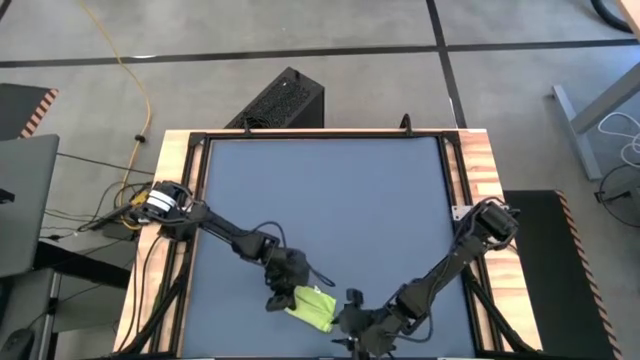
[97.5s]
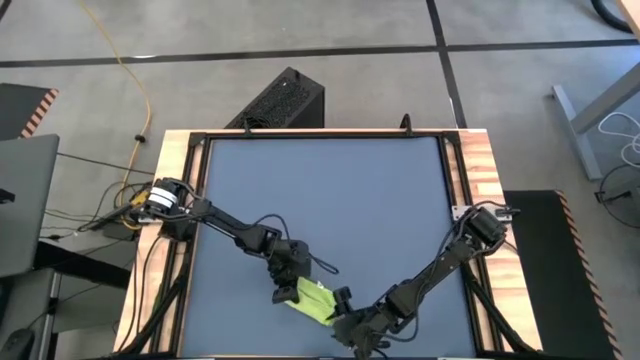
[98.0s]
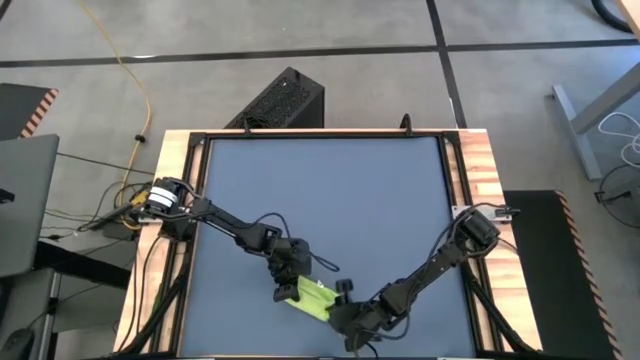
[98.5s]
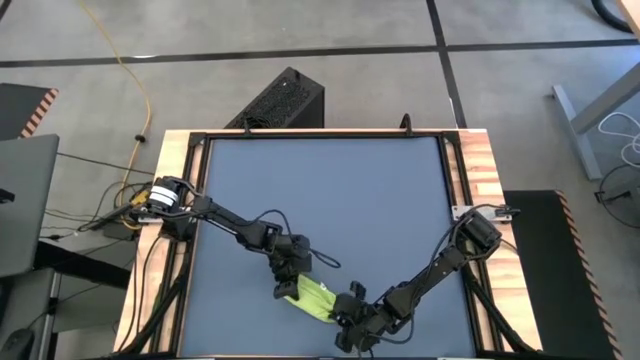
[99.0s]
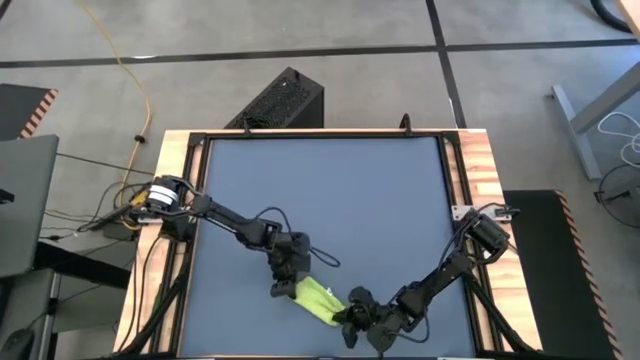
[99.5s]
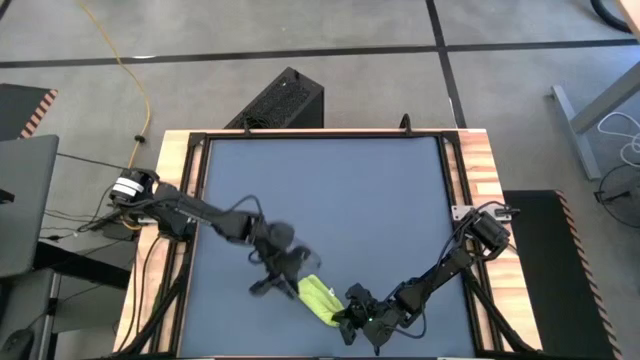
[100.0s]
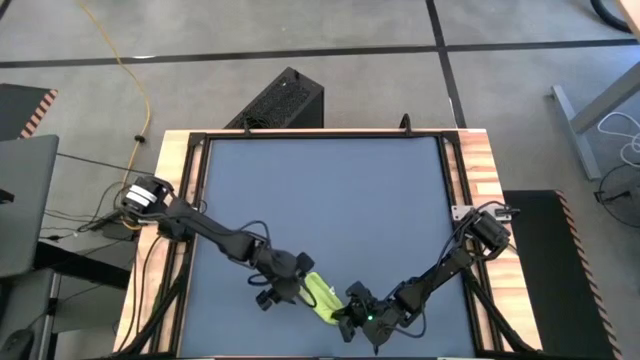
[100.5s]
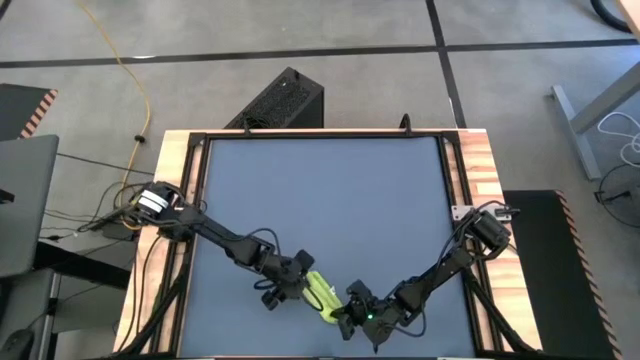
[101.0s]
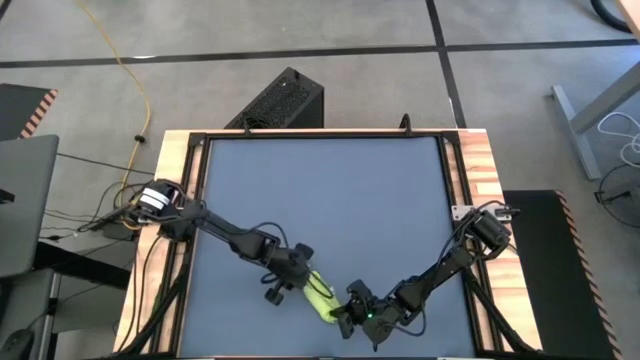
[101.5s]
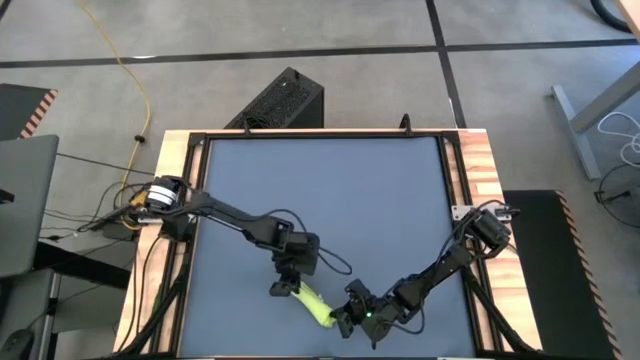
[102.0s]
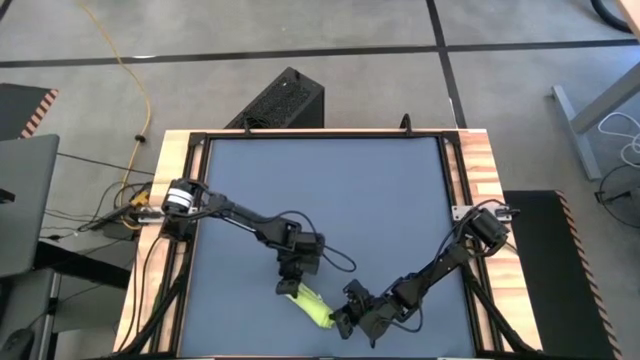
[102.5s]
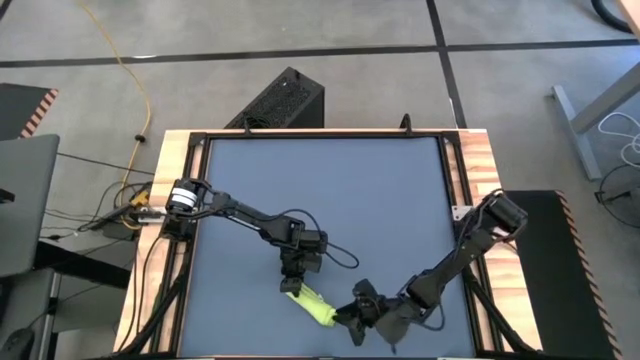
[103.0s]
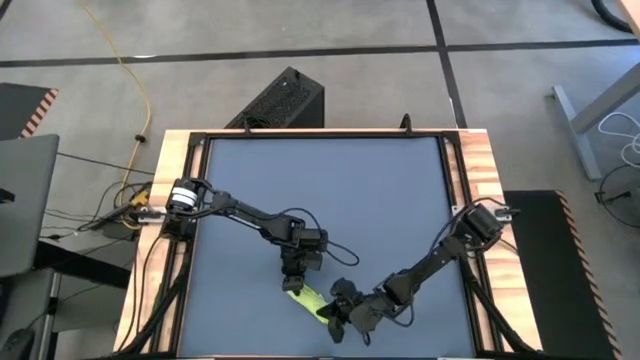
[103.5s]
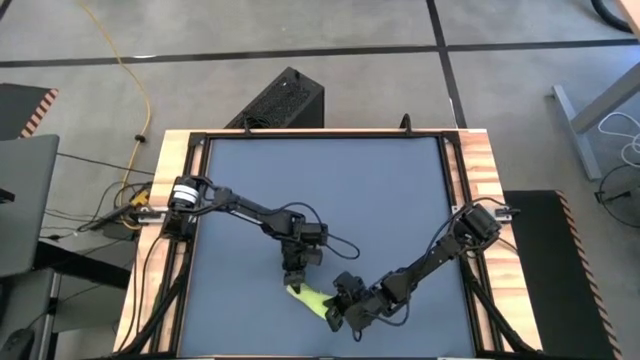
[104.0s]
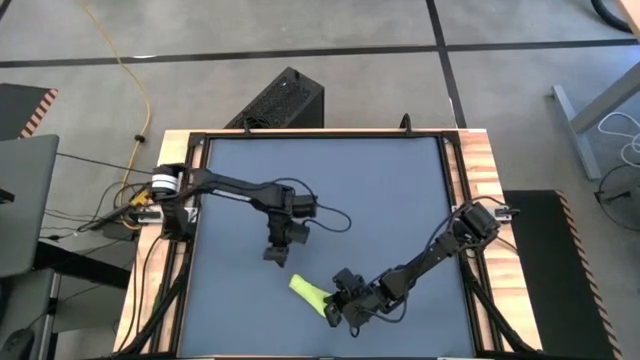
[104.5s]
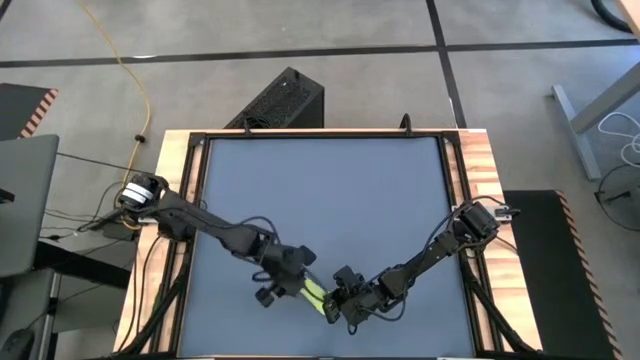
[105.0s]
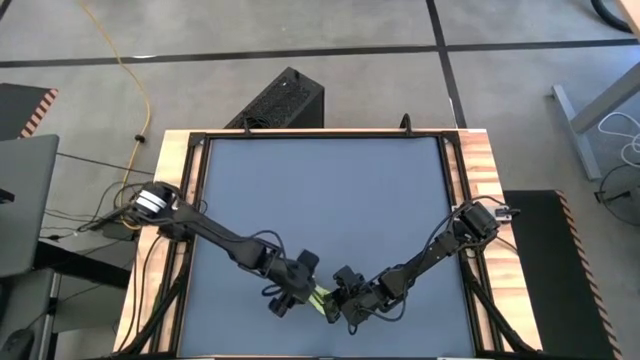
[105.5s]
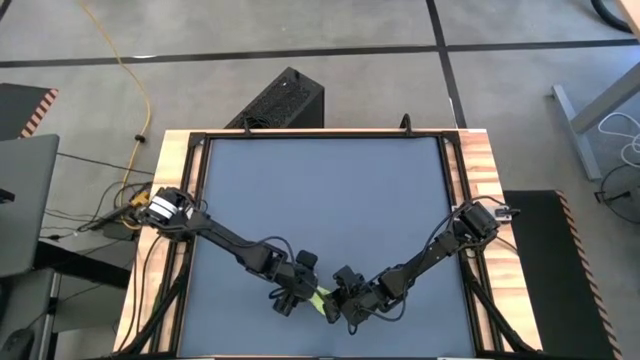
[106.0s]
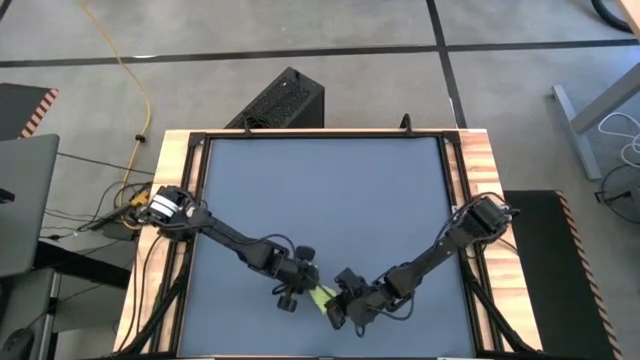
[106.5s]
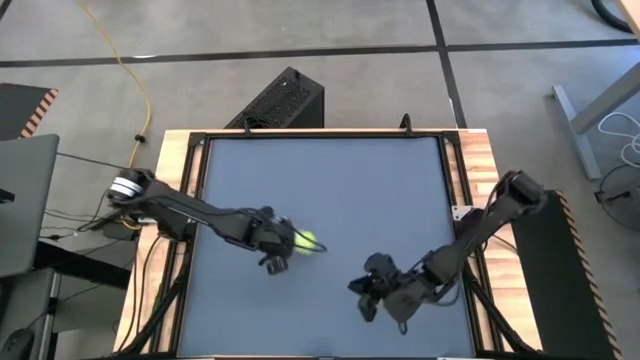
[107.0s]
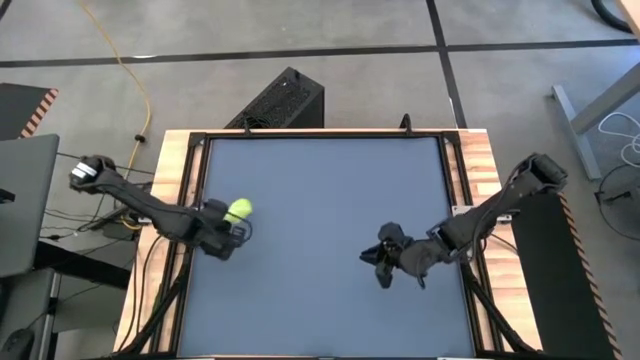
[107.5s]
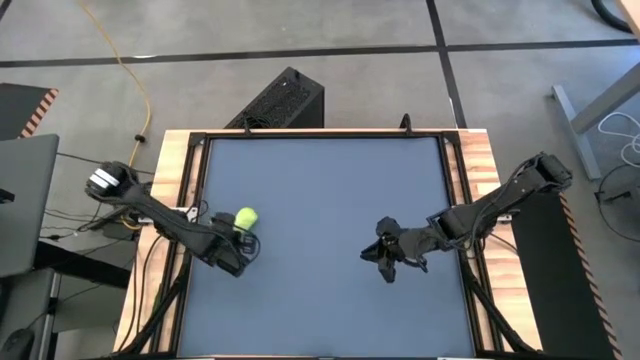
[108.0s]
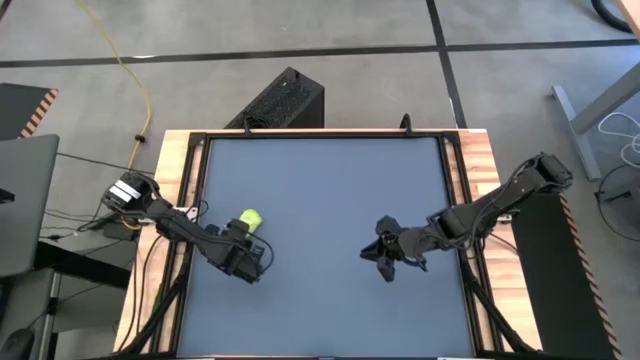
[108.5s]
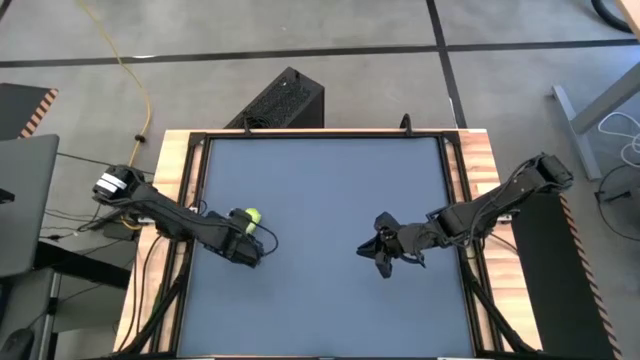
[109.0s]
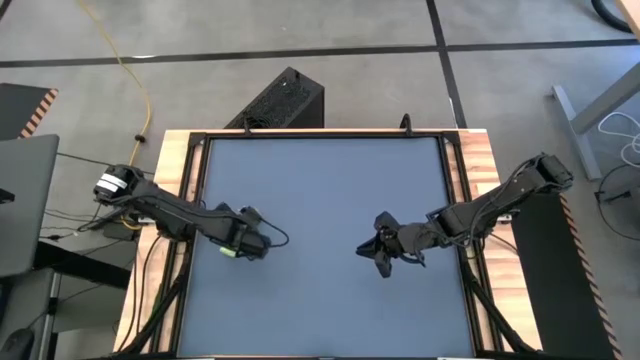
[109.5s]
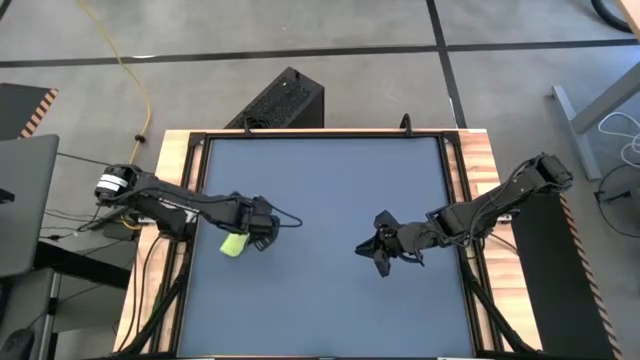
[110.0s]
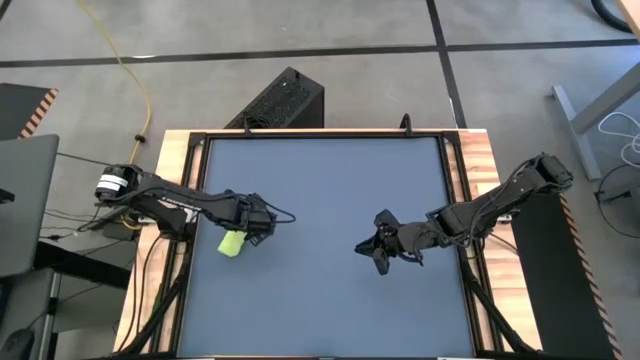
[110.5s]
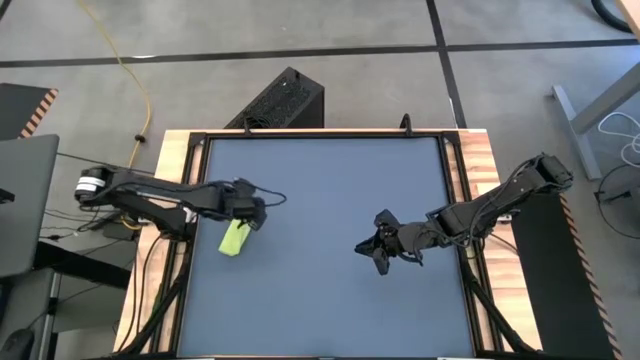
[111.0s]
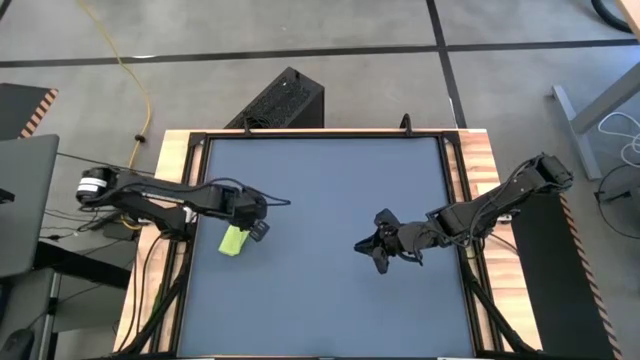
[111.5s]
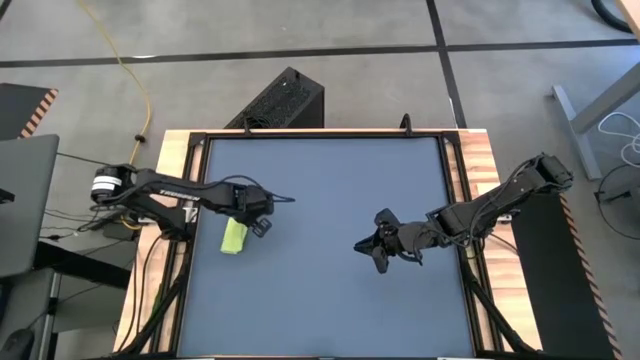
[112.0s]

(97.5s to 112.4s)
Task: Roll towel
Roll the green towel

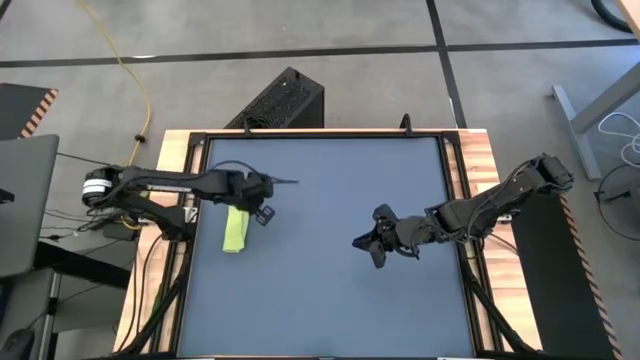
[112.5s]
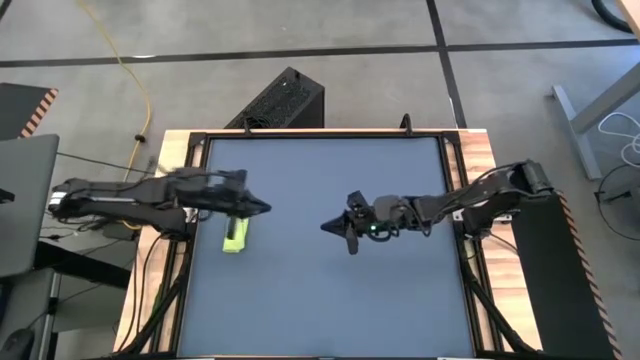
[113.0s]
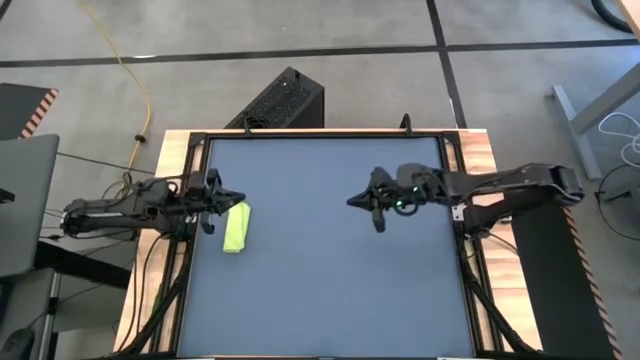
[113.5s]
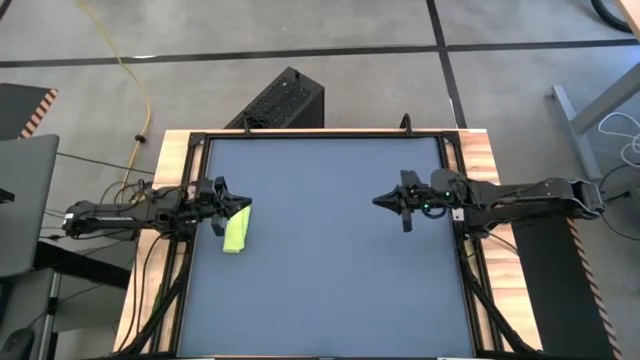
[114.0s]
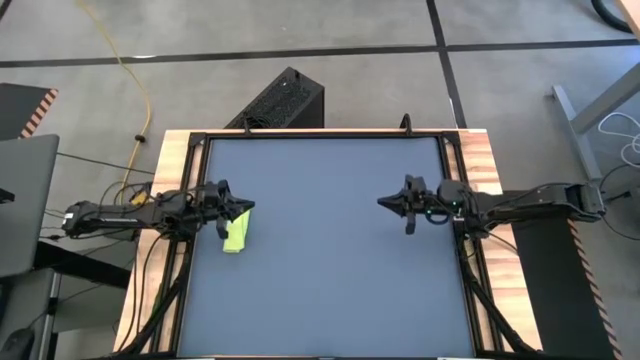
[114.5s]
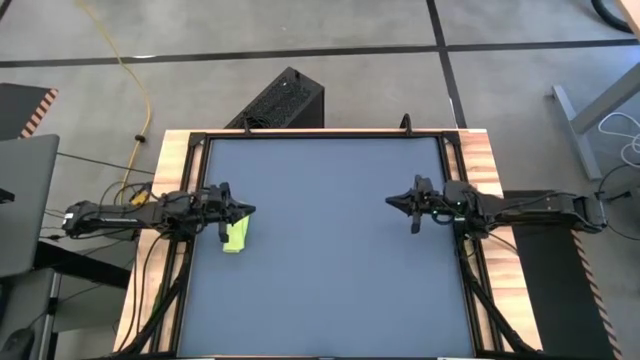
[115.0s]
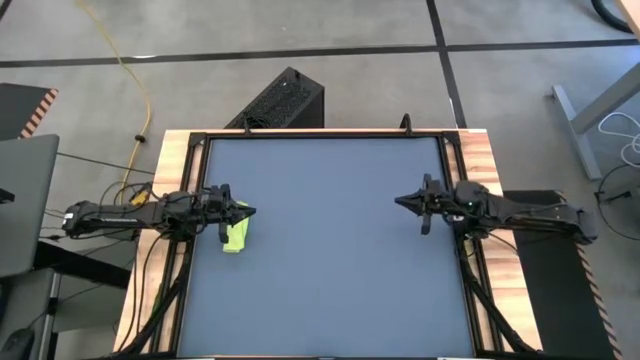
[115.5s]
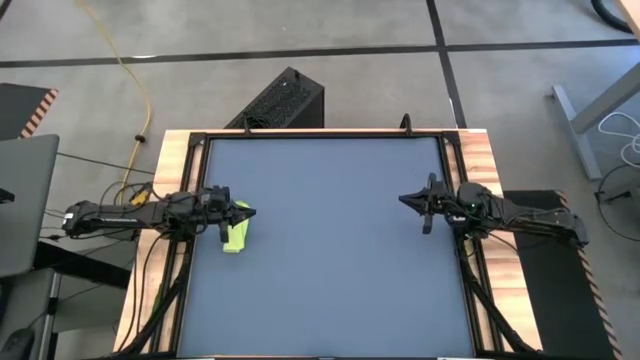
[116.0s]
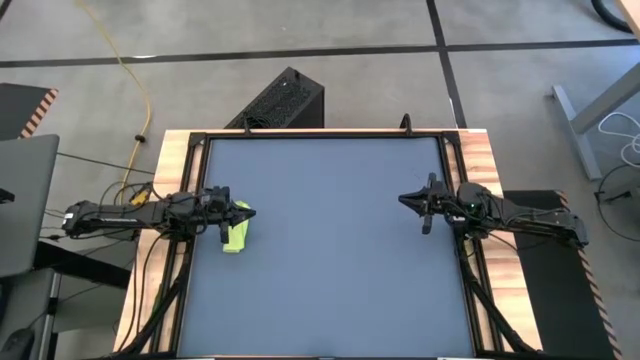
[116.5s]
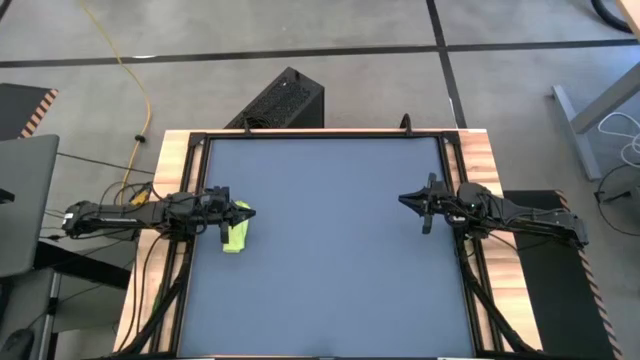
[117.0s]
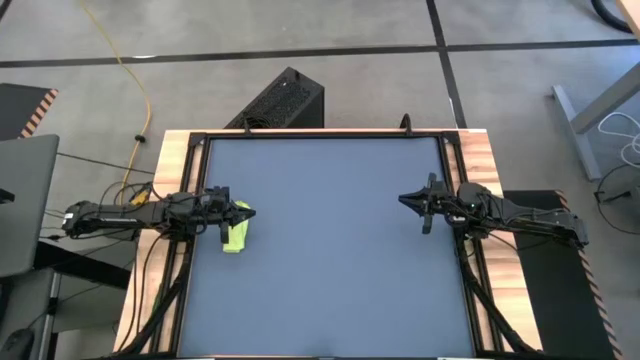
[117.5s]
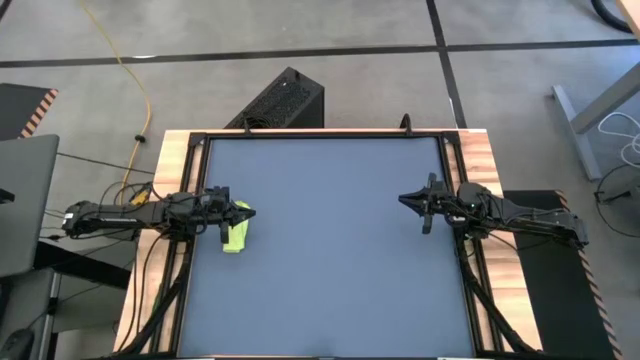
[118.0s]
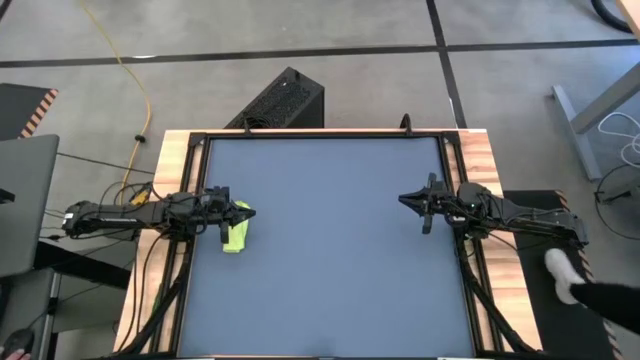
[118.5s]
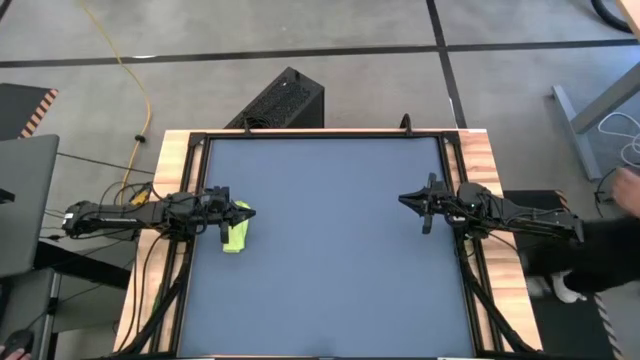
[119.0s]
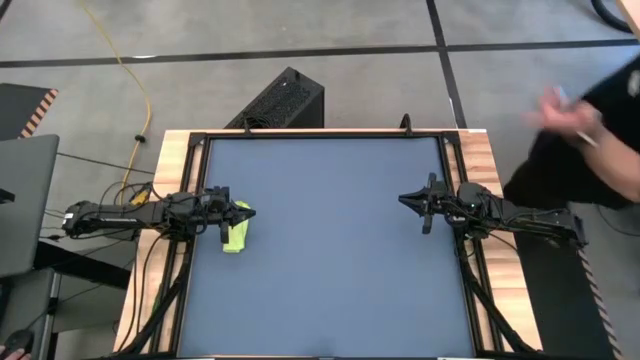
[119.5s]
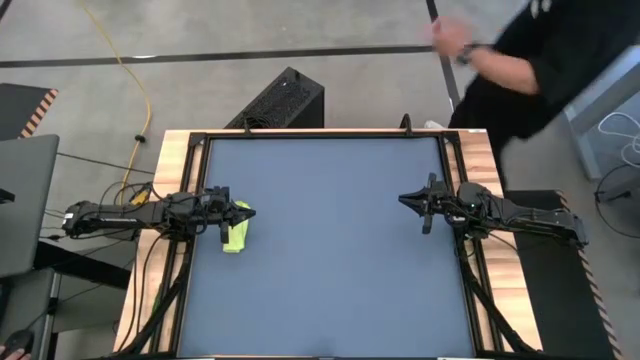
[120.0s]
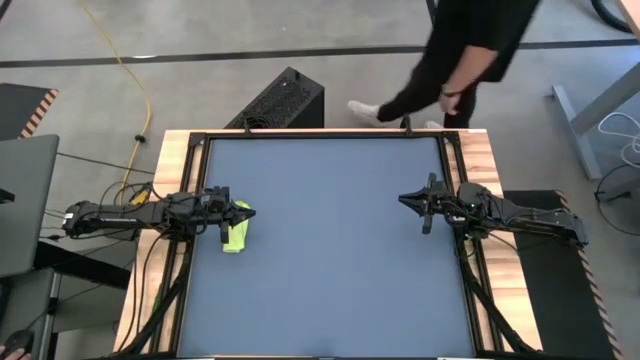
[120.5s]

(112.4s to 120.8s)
Return to Home Position
